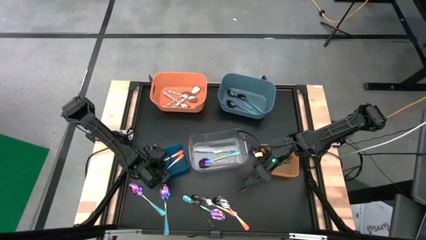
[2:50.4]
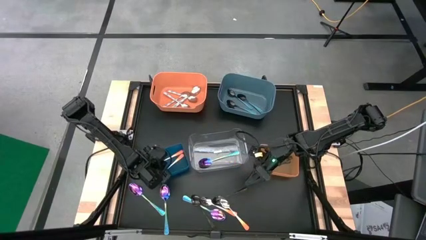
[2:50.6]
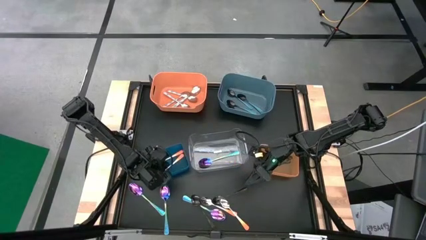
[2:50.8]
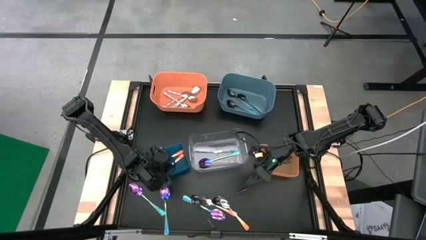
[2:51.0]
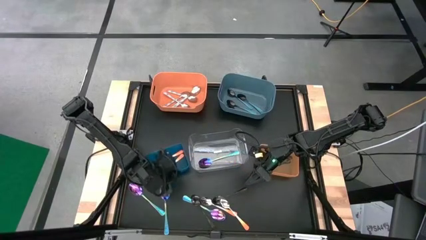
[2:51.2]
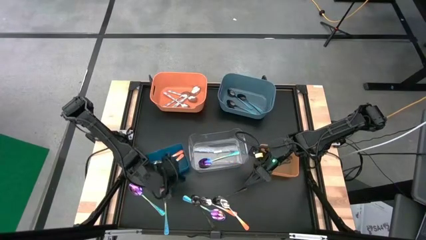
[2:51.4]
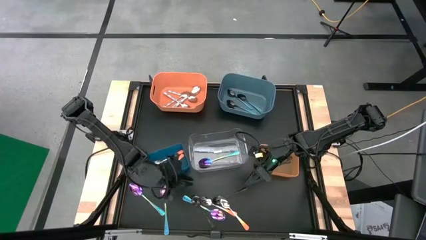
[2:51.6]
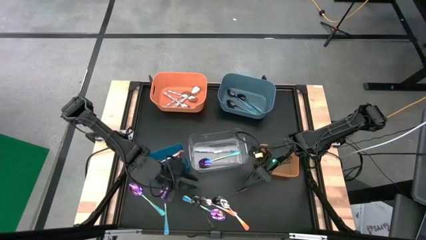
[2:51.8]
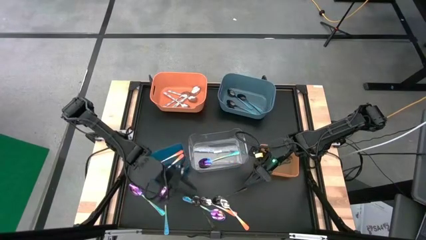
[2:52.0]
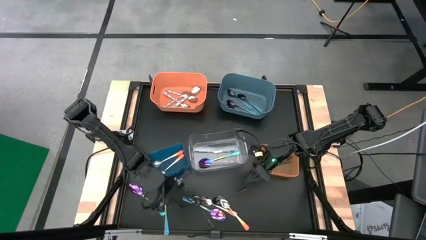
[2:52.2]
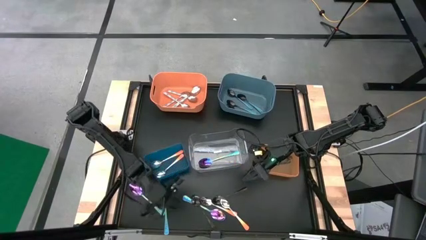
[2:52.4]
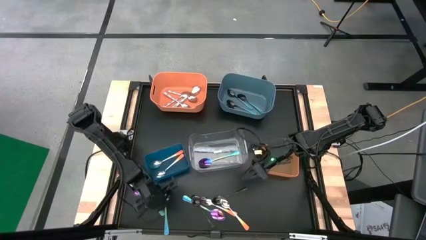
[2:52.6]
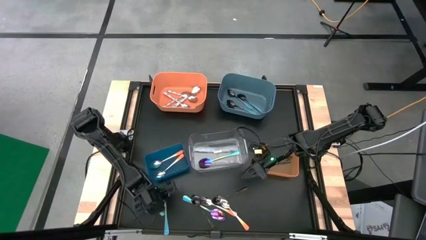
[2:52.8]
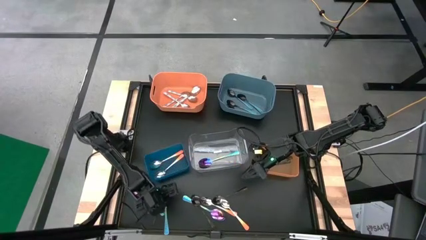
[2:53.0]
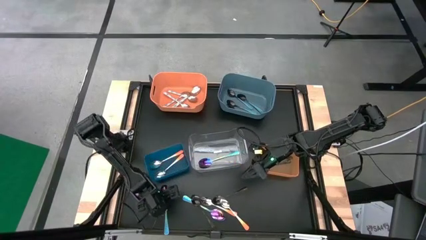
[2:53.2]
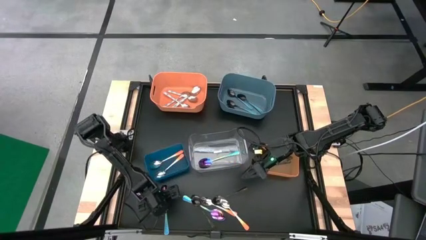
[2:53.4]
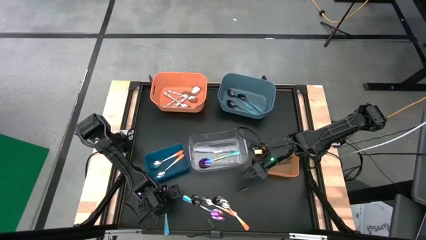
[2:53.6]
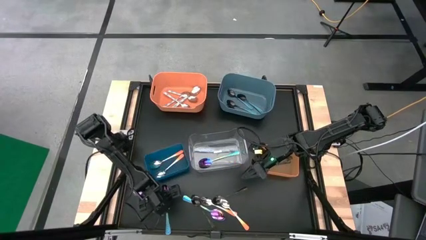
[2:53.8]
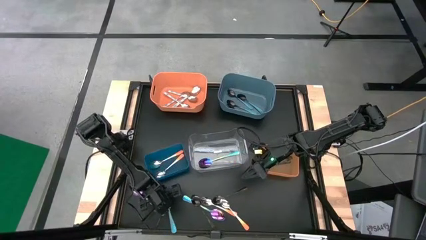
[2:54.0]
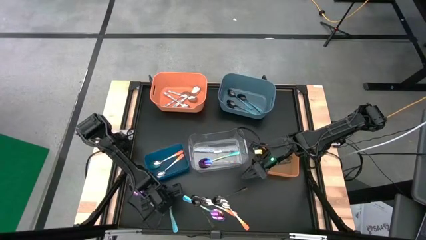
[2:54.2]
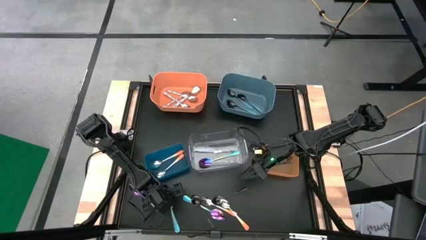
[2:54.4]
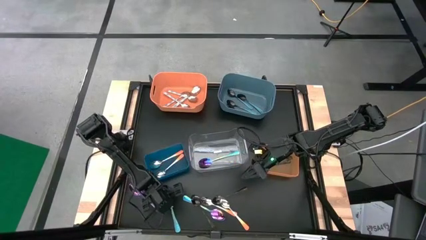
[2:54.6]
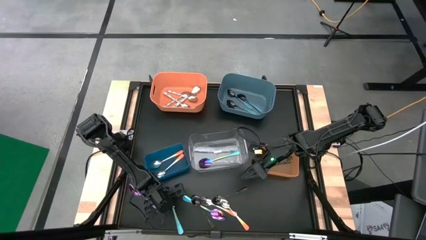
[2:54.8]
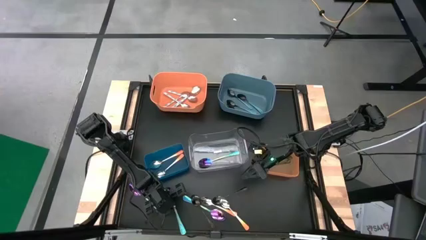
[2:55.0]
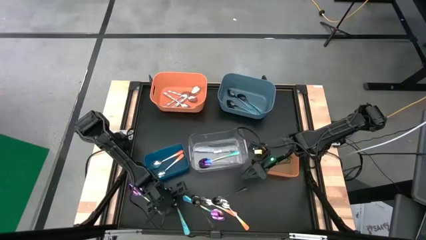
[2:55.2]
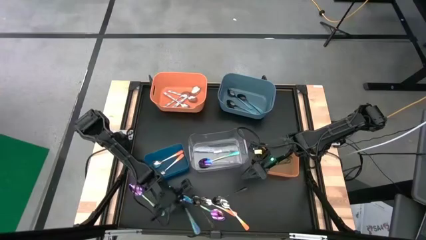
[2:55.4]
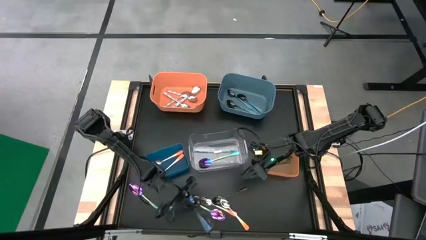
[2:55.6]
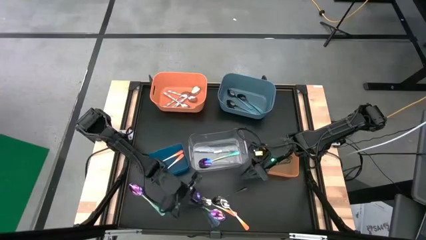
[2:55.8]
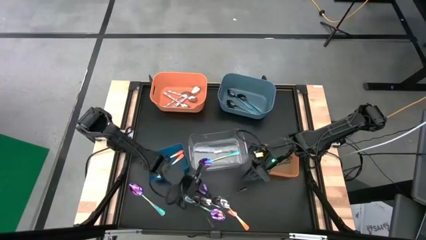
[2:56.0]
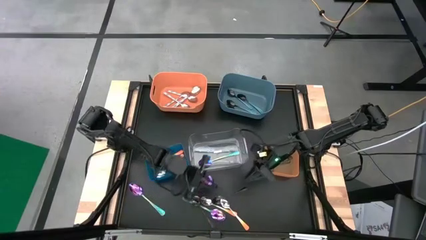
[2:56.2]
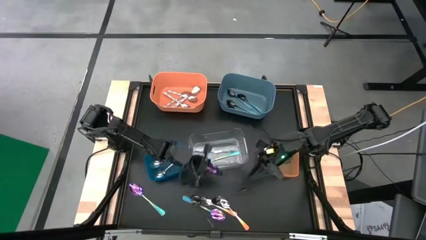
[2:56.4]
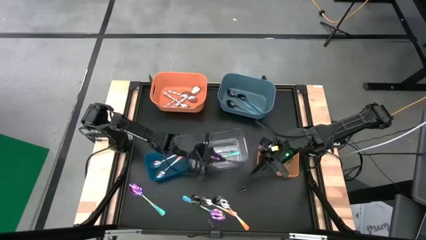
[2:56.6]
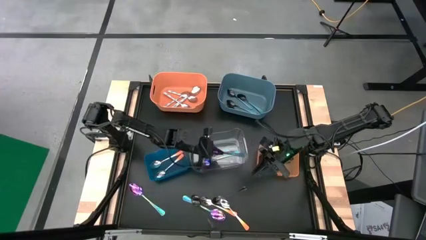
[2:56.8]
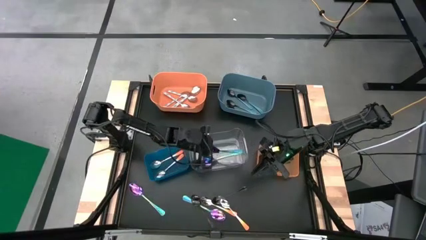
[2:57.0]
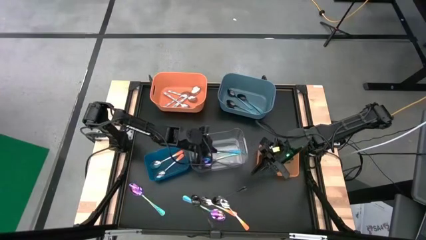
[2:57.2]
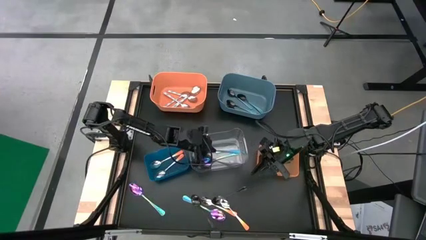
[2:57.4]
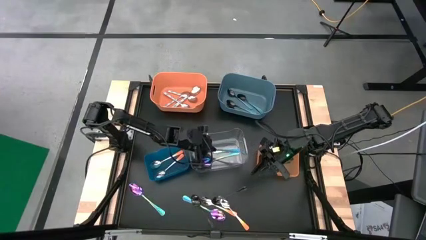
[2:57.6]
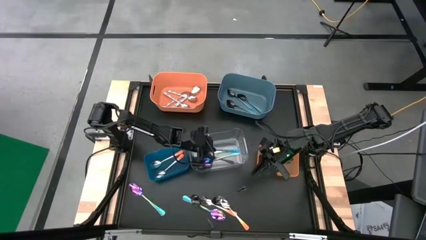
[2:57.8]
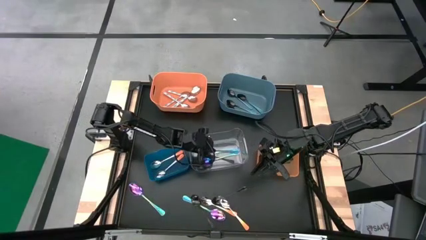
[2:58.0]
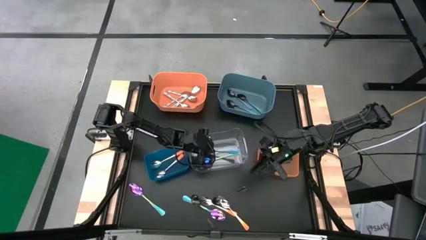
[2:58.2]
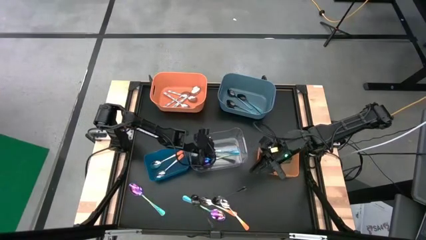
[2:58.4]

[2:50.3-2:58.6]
Task: Sort silverware by color (type)
Put the purple spoon into the transparent bin

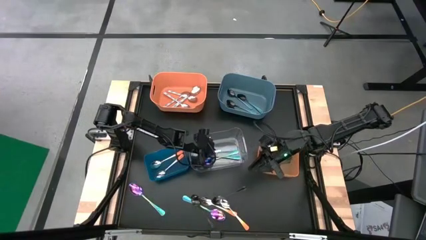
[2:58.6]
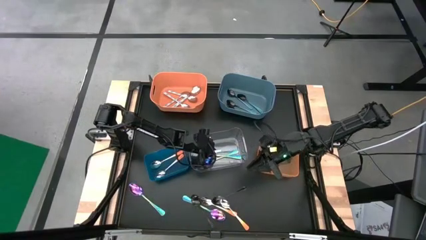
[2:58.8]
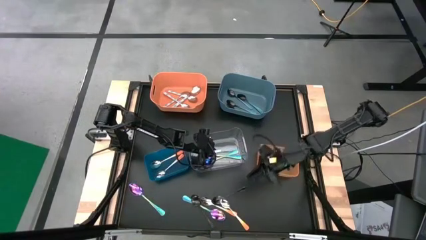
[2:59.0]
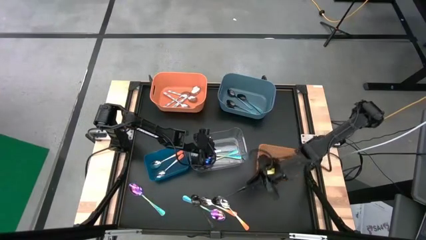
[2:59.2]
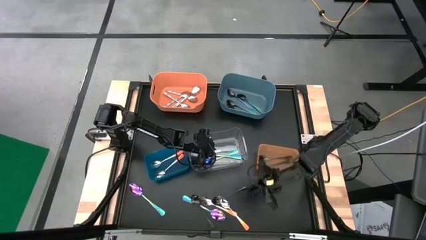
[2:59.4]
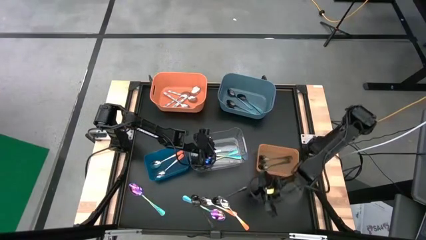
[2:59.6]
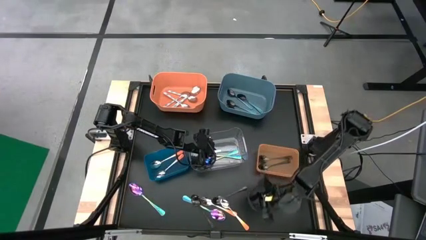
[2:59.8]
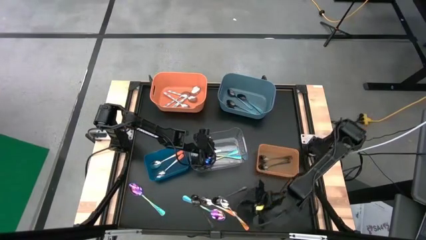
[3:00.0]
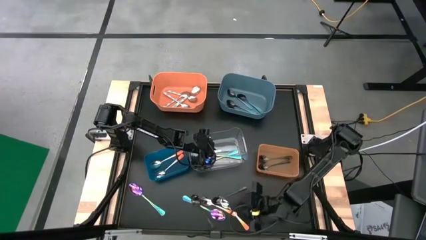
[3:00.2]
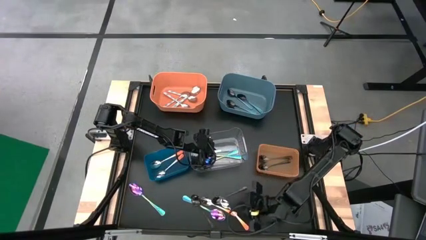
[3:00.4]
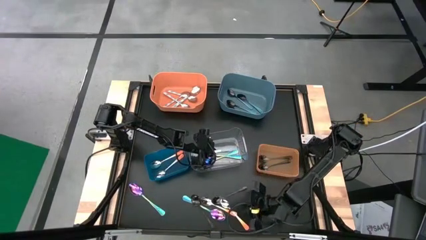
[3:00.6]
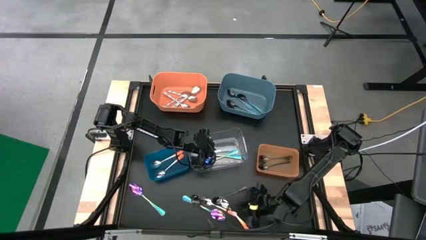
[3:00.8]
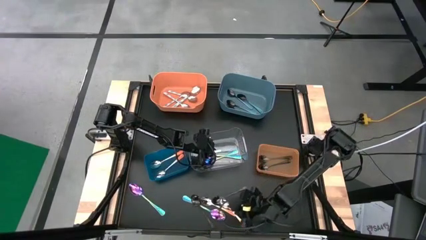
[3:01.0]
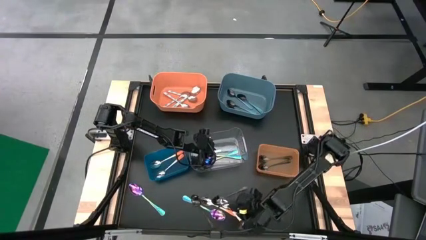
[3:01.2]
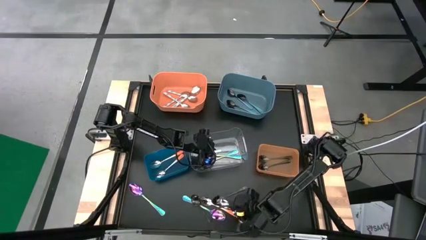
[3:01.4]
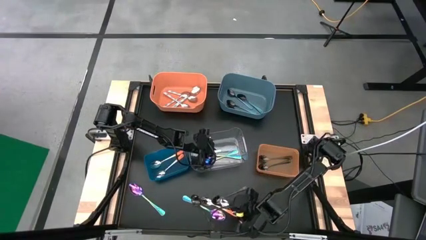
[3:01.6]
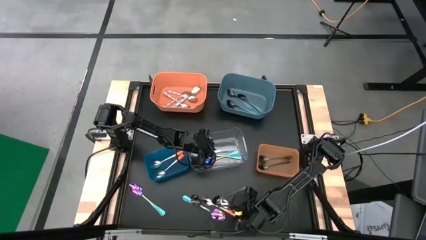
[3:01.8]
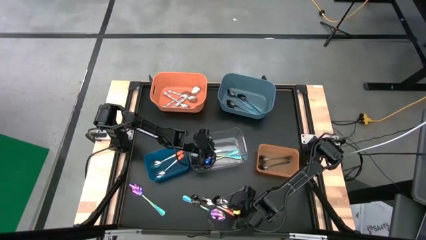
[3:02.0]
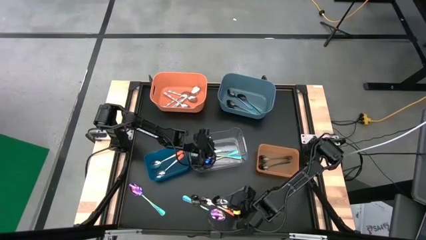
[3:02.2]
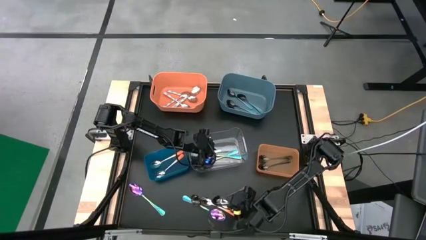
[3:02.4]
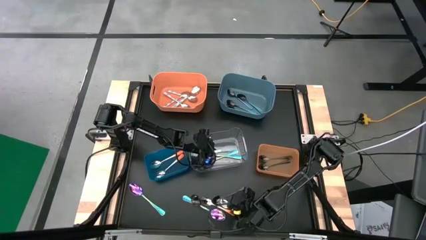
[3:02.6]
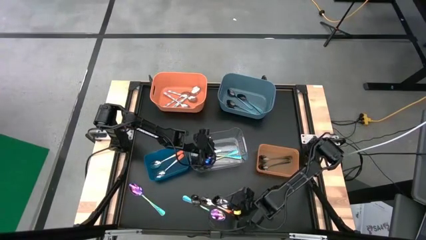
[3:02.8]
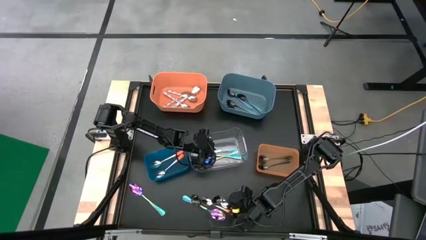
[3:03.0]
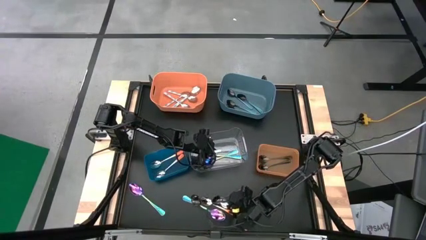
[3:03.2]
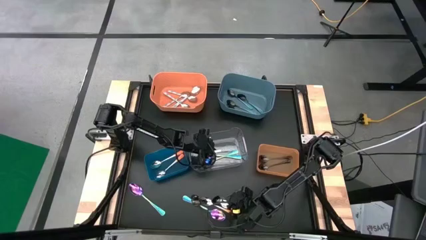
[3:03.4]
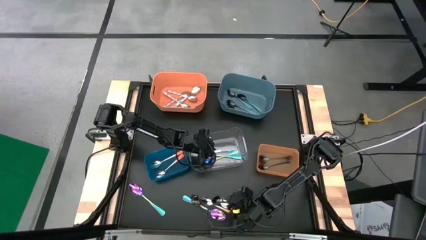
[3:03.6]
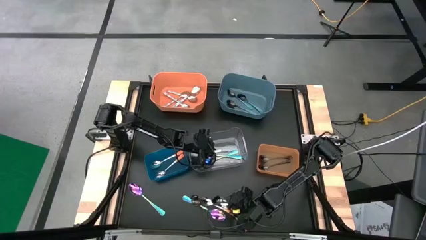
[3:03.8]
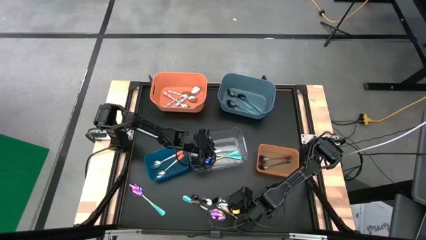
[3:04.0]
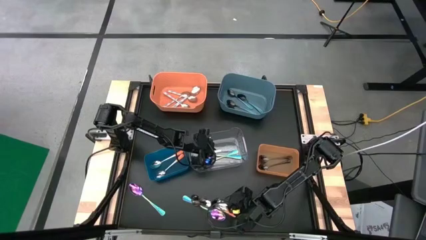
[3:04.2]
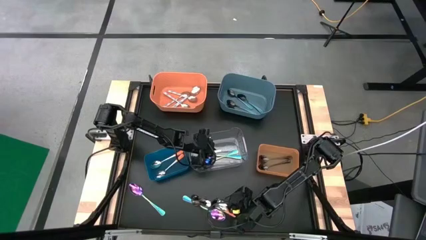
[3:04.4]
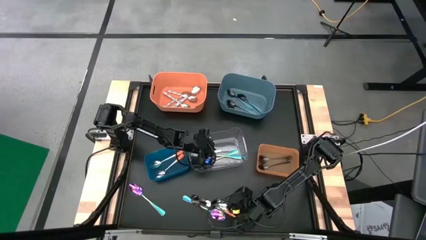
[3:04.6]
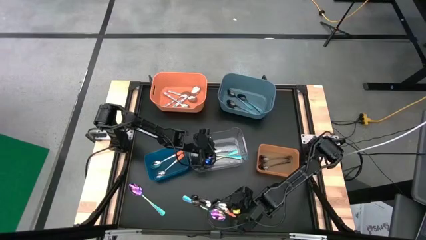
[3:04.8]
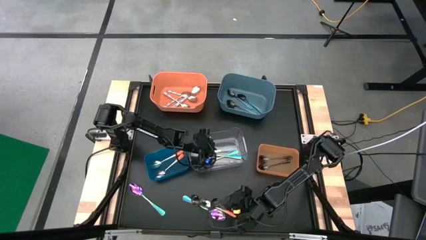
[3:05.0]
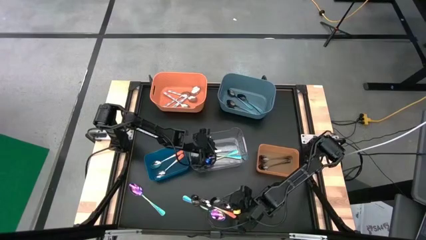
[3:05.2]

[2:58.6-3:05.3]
Put the orange spoon into the blue bin
